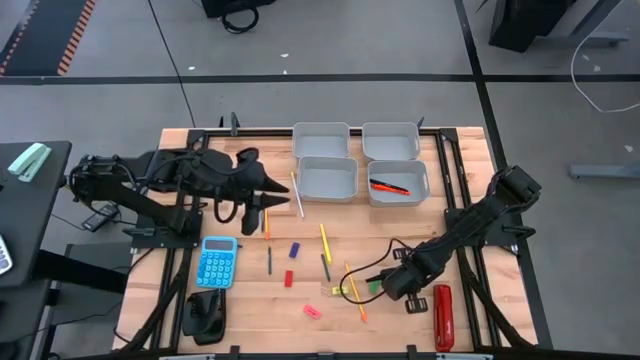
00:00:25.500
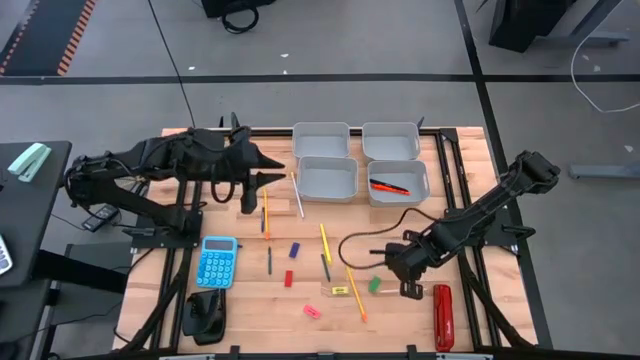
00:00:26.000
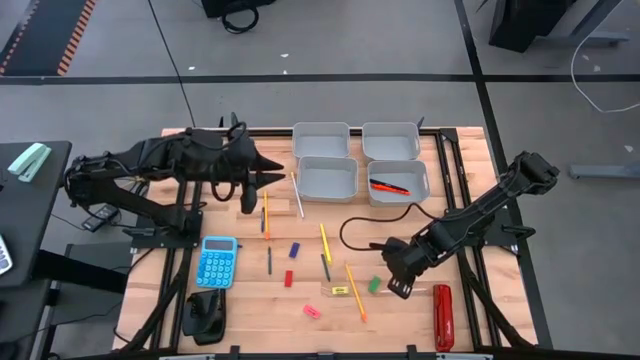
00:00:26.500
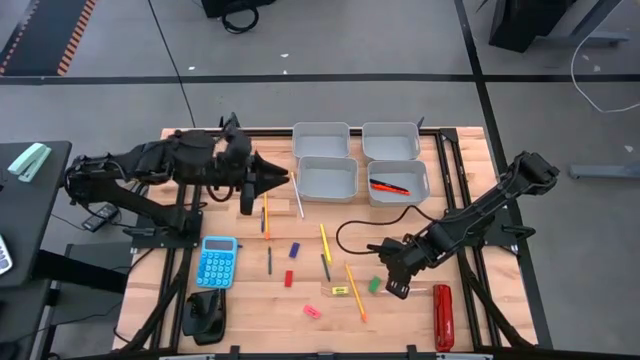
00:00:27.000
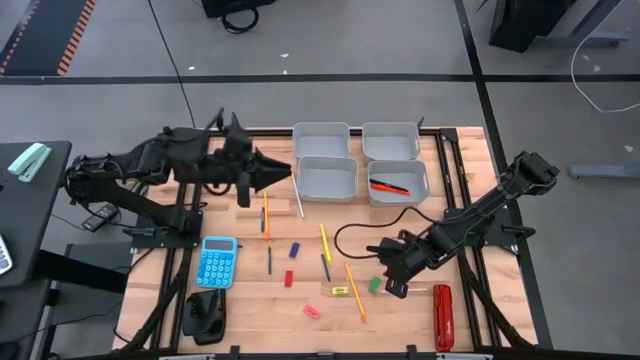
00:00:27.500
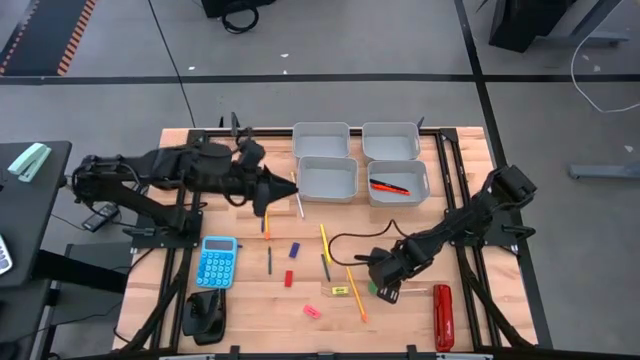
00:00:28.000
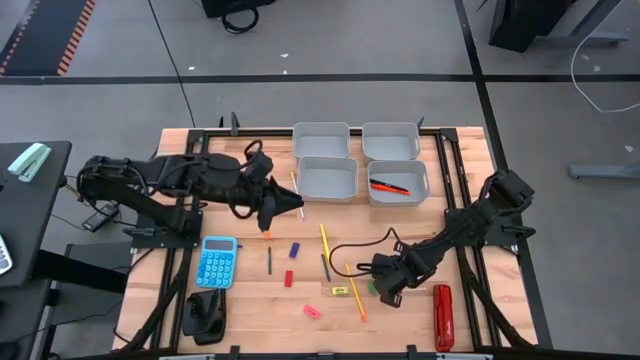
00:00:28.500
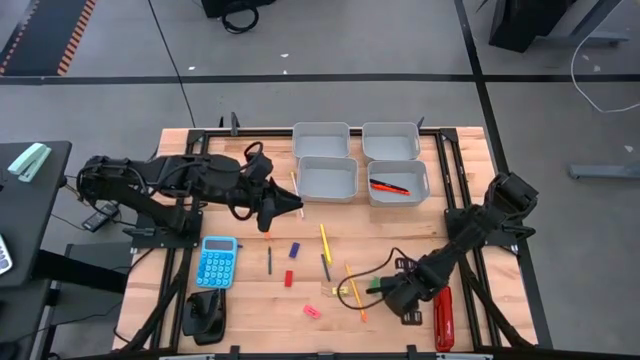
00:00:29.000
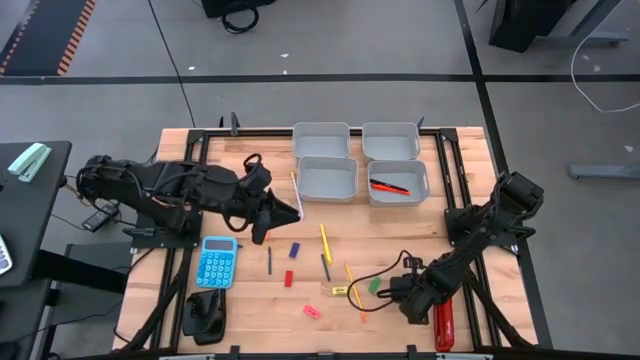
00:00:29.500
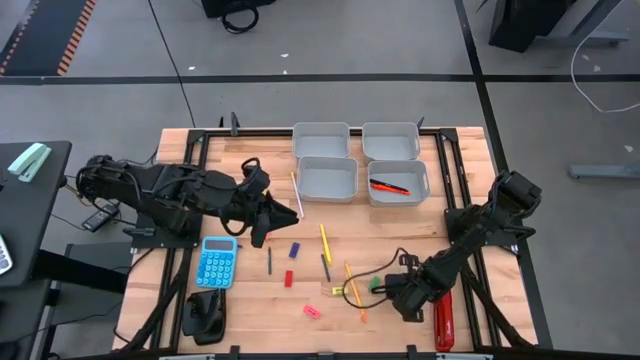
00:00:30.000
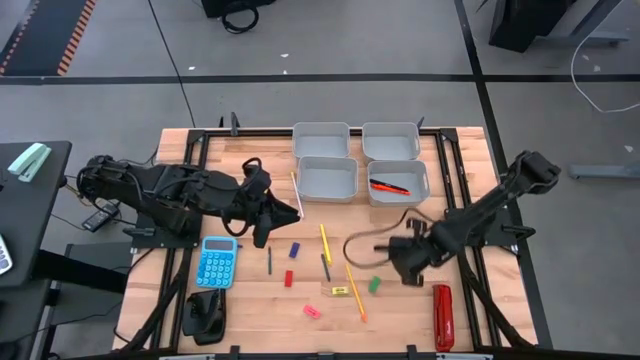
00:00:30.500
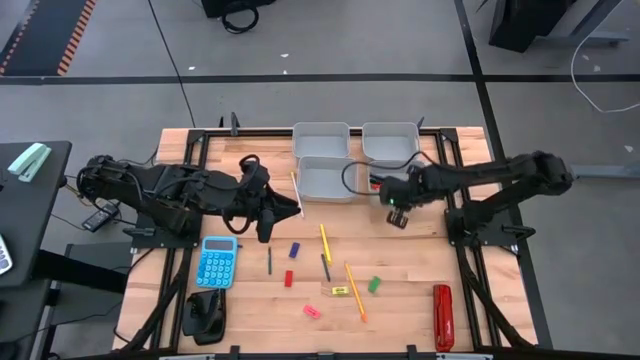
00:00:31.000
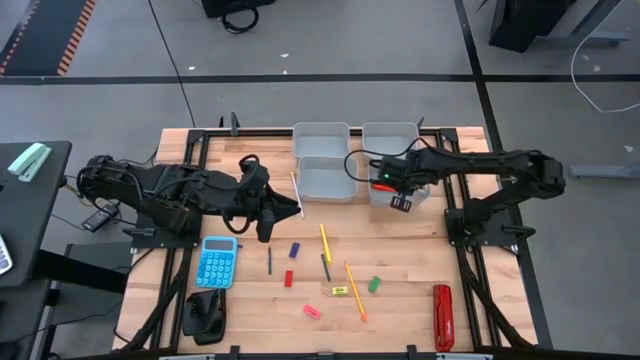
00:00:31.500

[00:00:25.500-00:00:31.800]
Task: Sort crayons/erasers/pens/pencils in bins
Put the white pen into the bottom right gray bin

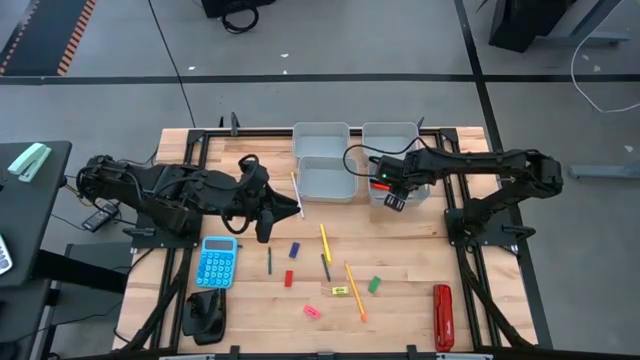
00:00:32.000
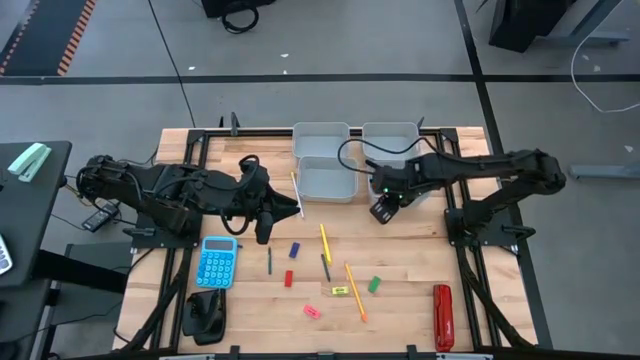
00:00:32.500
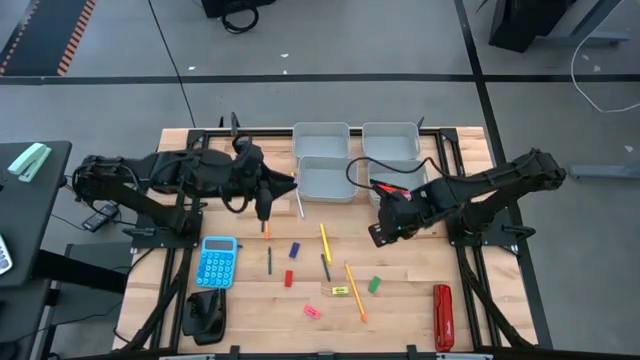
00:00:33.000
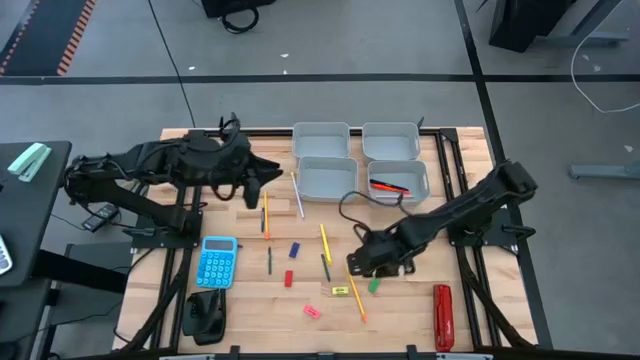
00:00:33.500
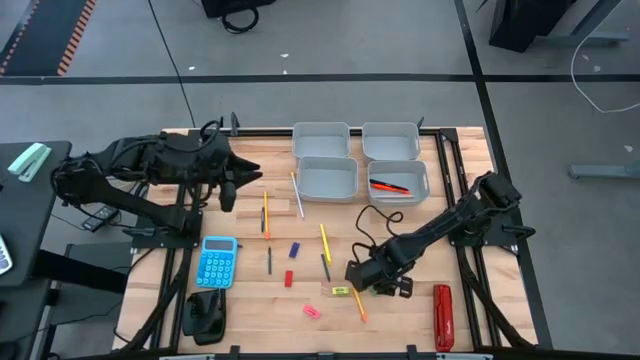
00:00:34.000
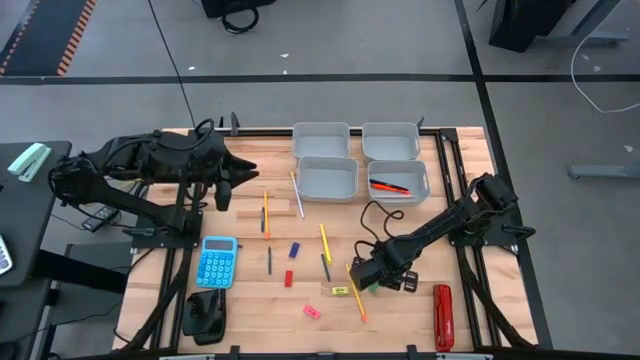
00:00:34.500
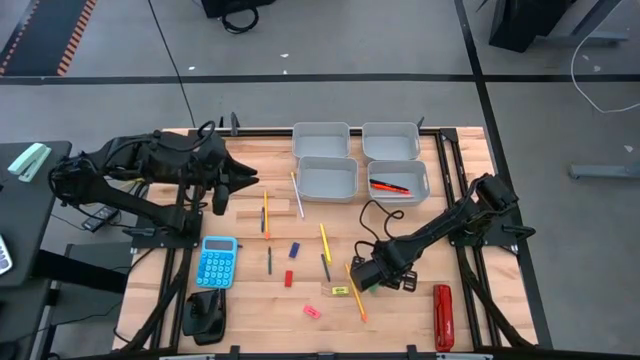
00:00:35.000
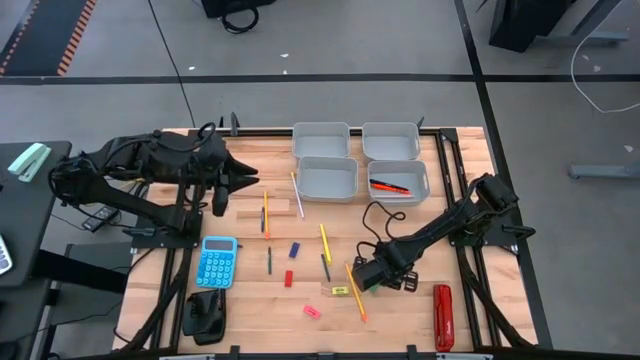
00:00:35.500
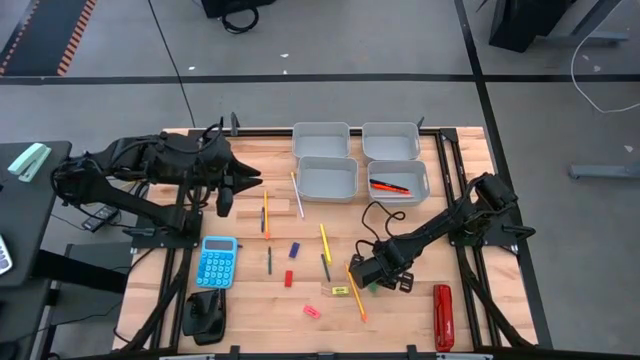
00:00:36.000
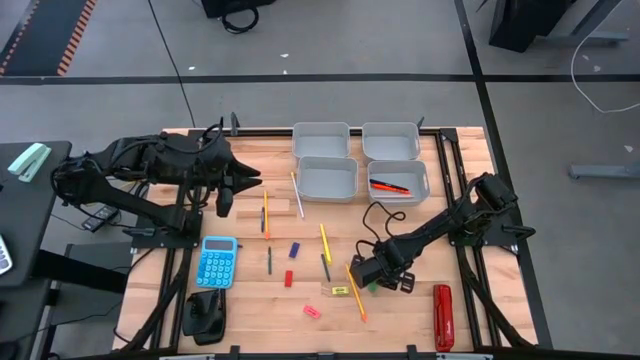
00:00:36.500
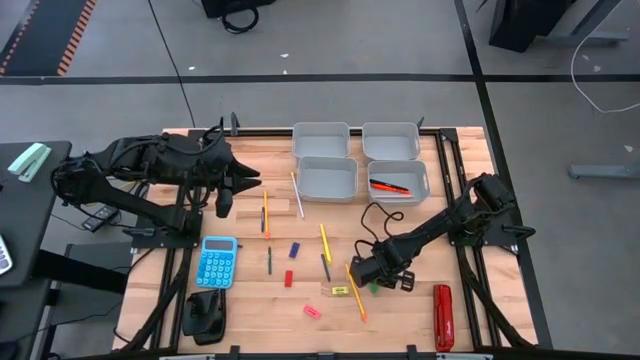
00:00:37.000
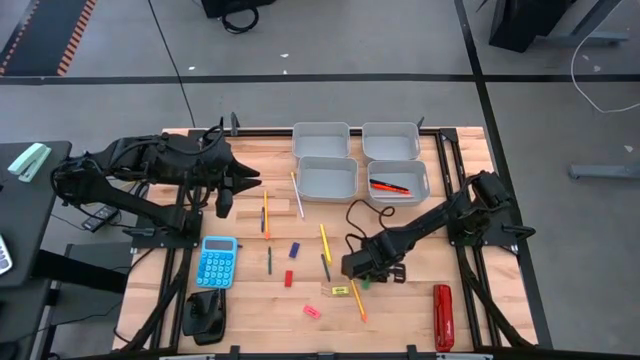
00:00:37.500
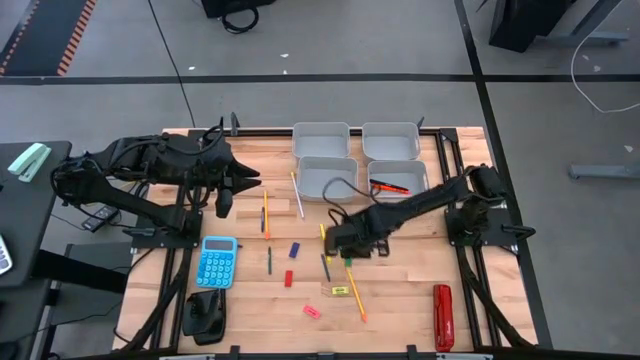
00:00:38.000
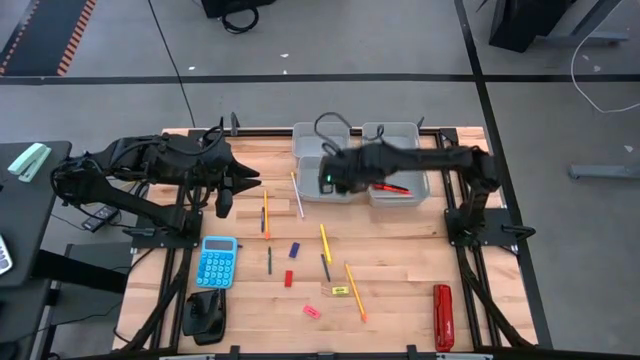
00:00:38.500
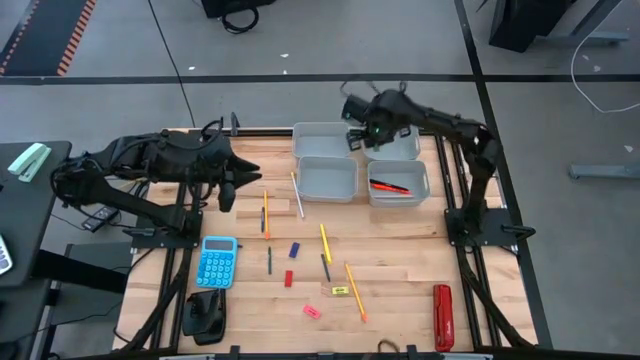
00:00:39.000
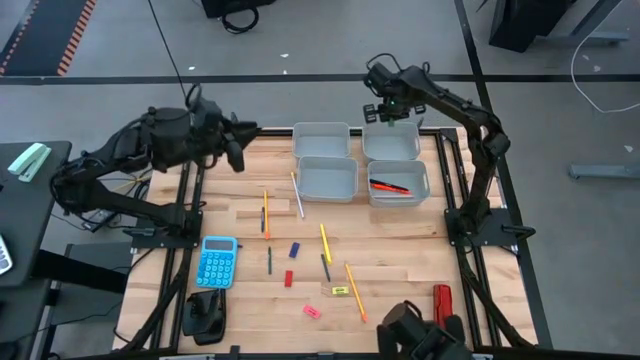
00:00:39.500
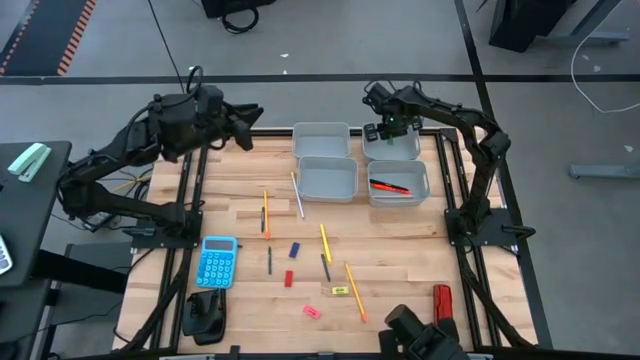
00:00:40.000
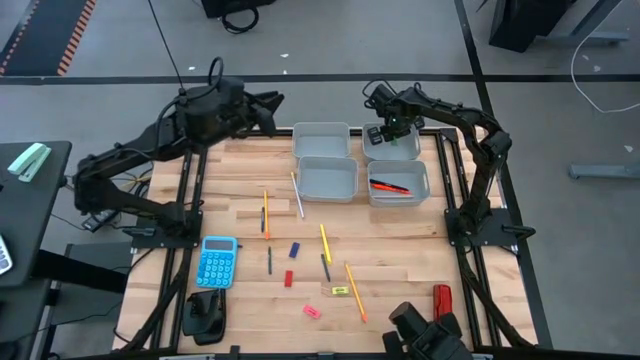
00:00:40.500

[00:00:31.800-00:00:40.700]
Put the green eraser into the top right gray bin

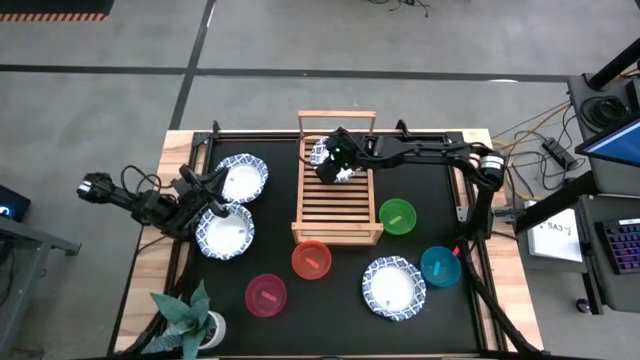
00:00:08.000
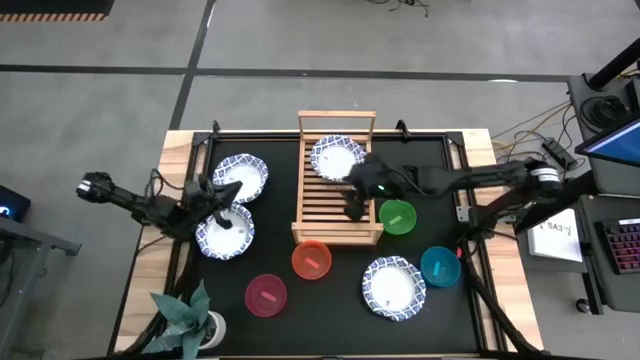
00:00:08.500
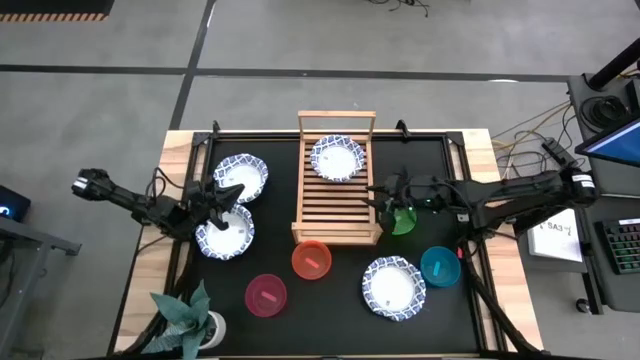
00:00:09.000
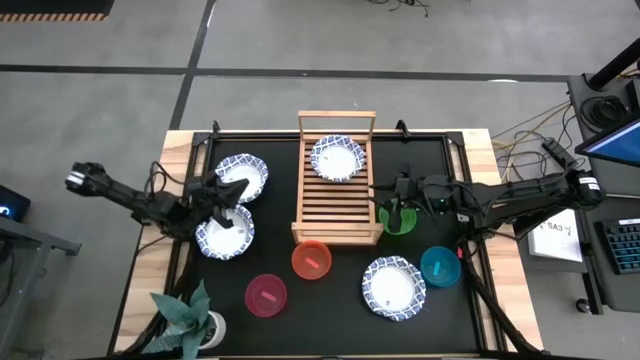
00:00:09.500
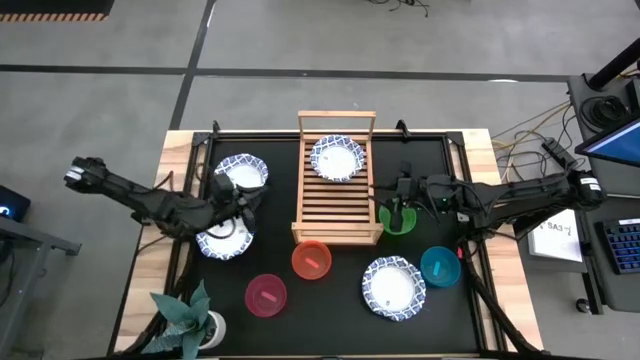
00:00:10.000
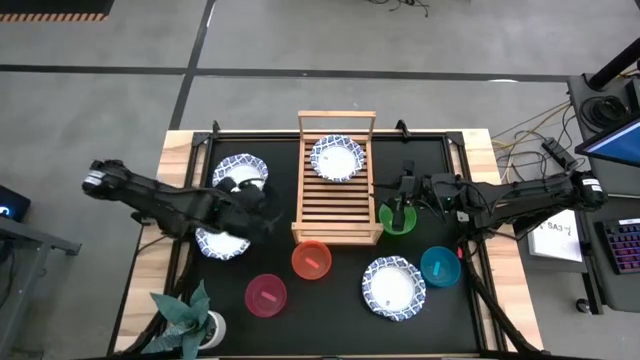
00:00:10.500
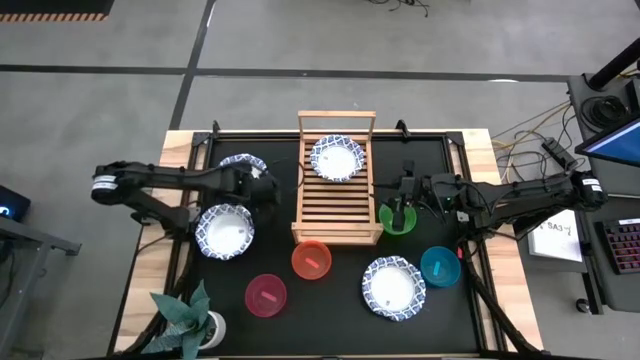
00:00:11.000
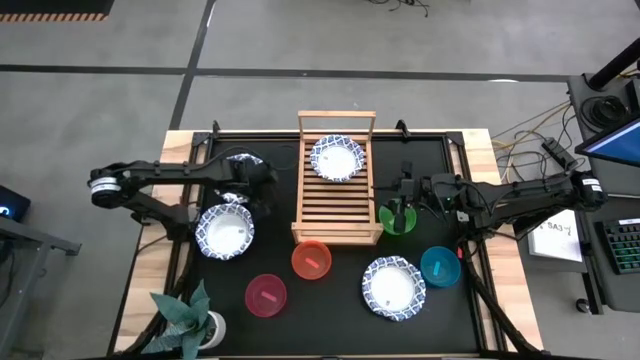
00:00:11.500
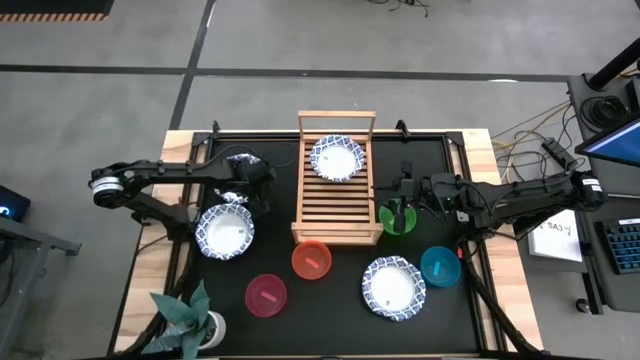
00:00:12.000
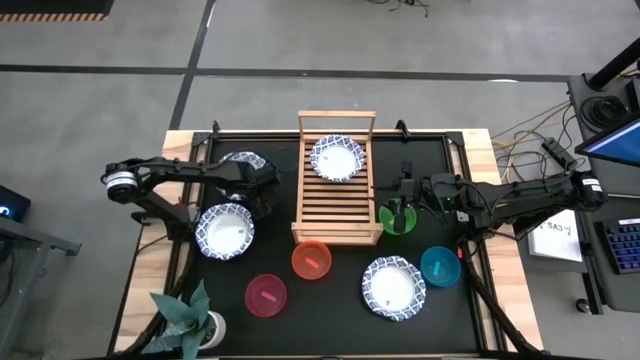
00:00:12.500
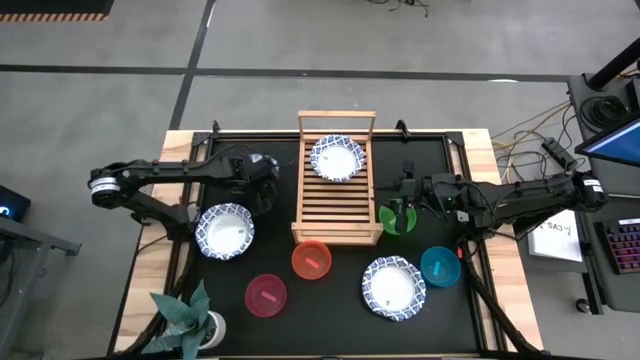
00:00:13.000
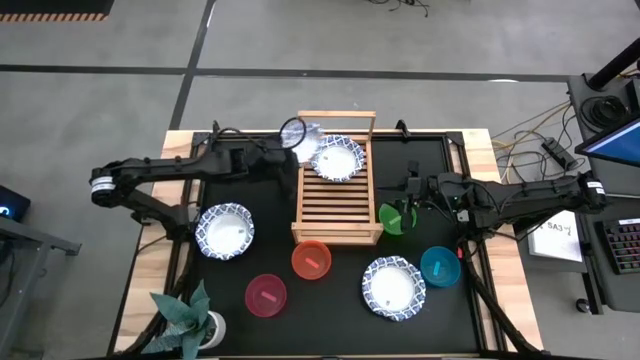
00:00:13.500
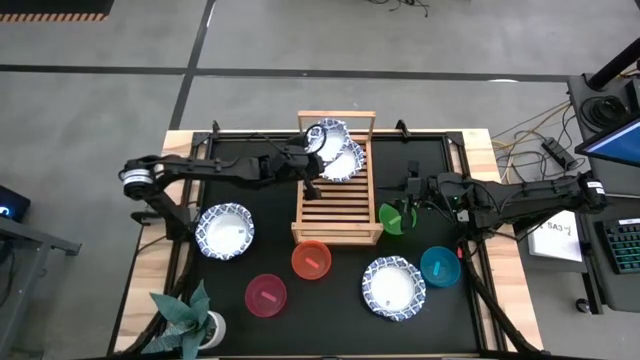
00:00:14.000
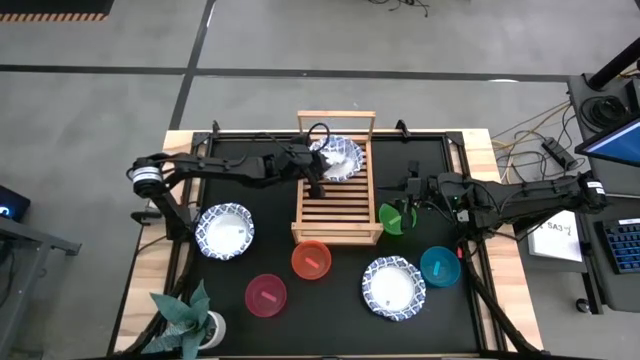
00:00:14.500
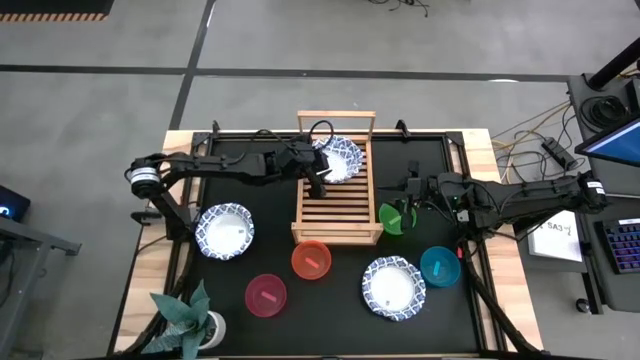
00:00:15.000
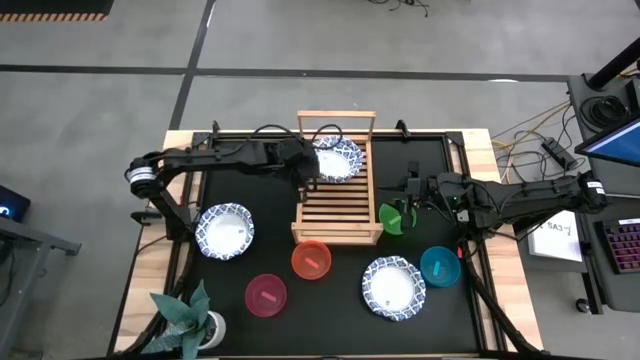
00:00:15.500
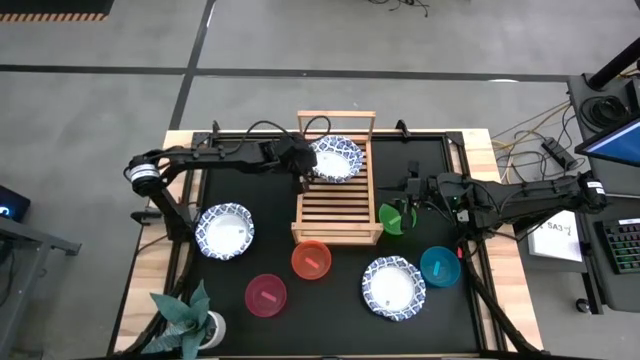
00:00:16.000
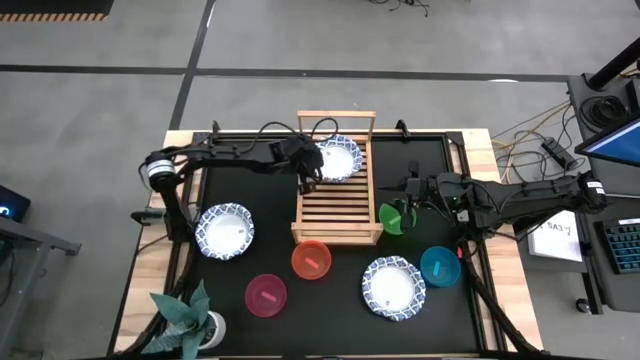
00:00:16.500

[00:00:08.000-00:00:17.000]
Task: Place and stack bowls onto a shelf
Stack the top left white bowl on top of the white bowl on the shelf
